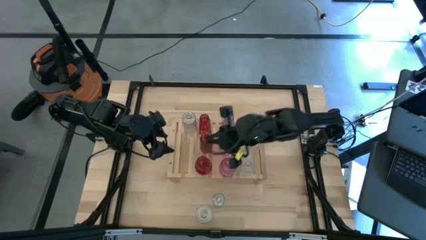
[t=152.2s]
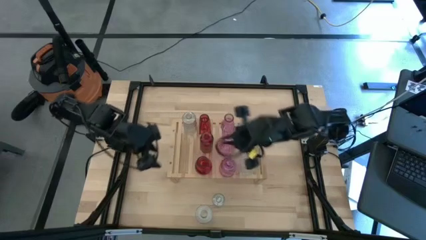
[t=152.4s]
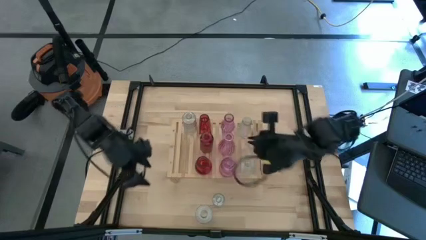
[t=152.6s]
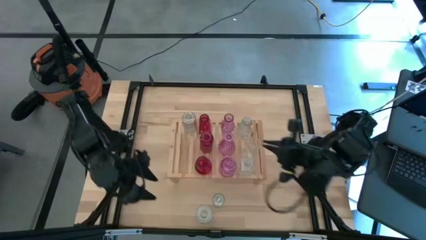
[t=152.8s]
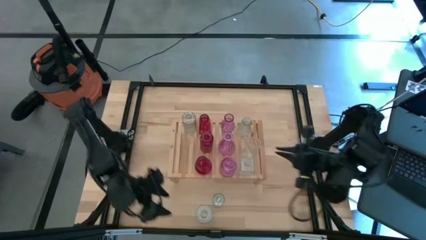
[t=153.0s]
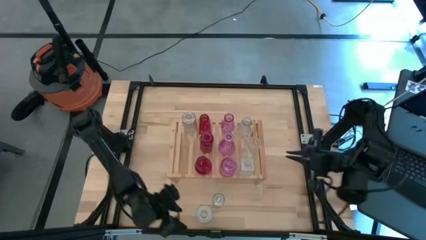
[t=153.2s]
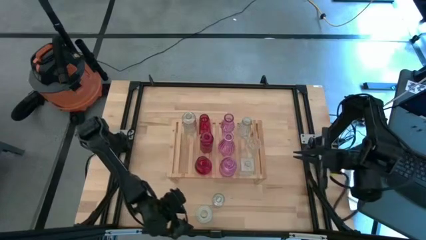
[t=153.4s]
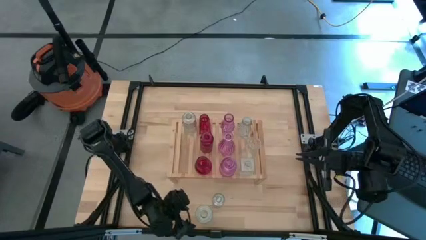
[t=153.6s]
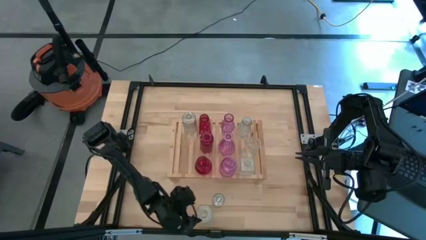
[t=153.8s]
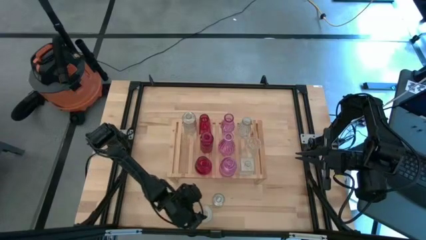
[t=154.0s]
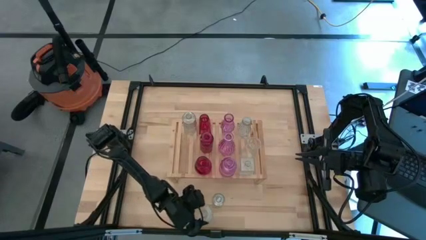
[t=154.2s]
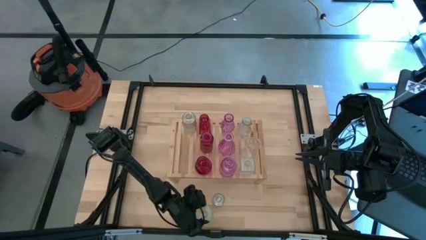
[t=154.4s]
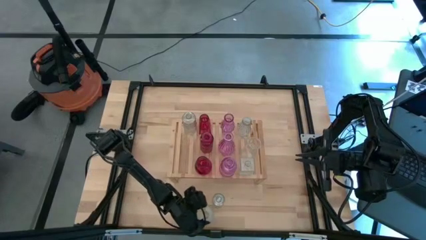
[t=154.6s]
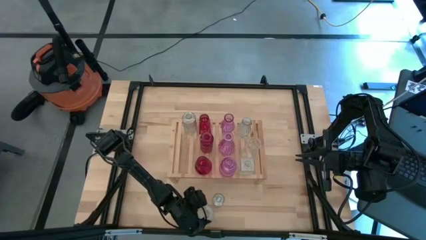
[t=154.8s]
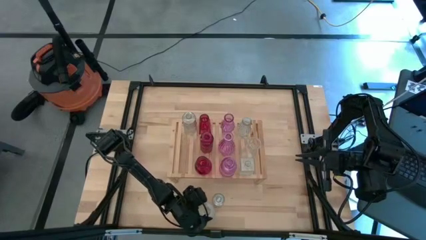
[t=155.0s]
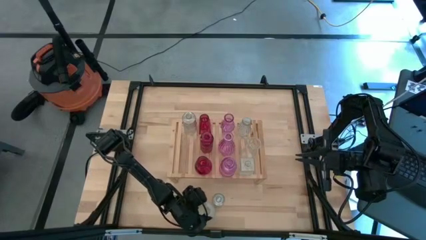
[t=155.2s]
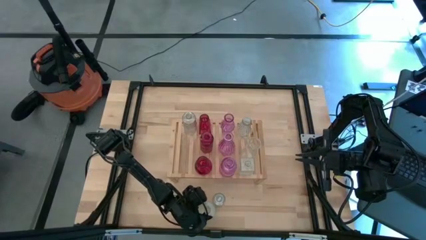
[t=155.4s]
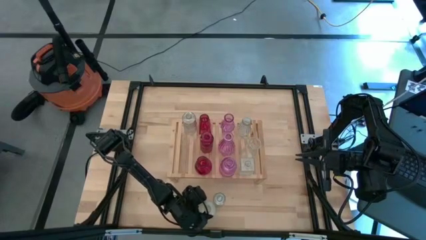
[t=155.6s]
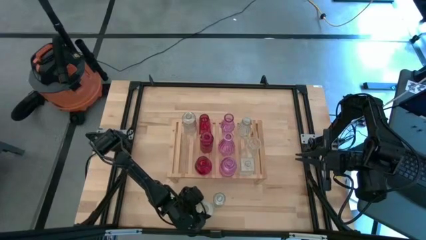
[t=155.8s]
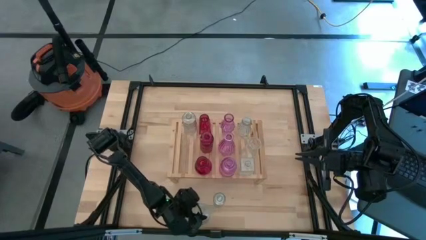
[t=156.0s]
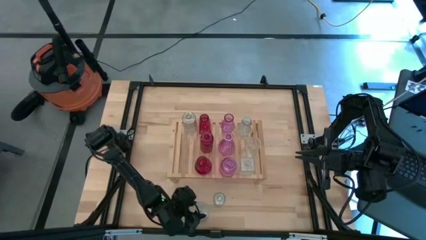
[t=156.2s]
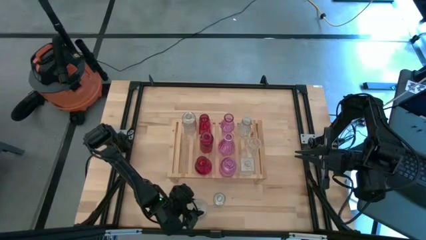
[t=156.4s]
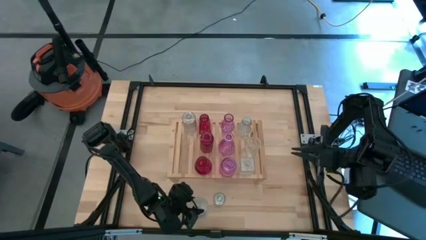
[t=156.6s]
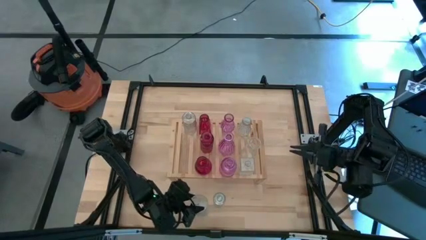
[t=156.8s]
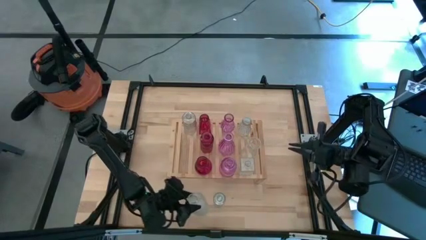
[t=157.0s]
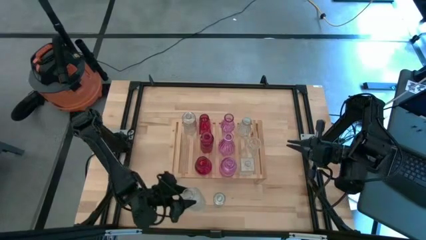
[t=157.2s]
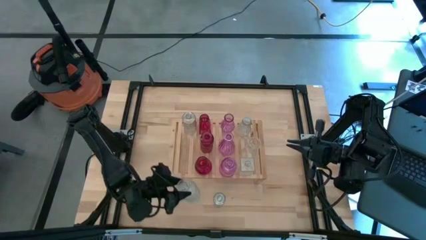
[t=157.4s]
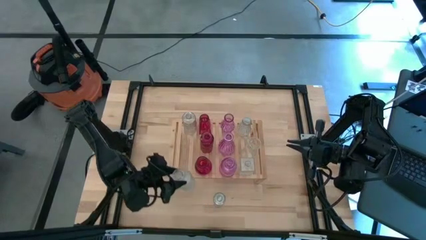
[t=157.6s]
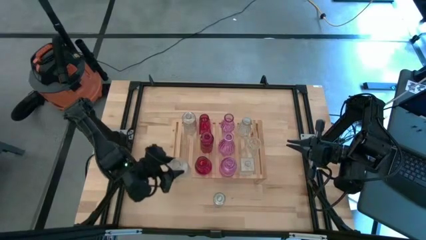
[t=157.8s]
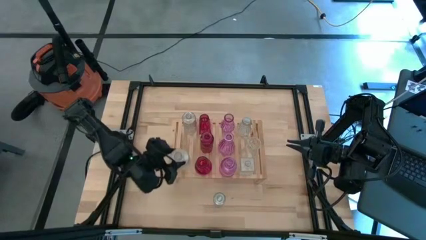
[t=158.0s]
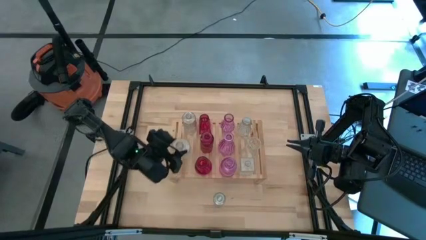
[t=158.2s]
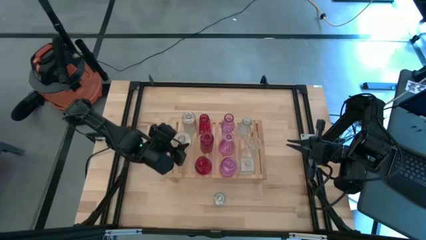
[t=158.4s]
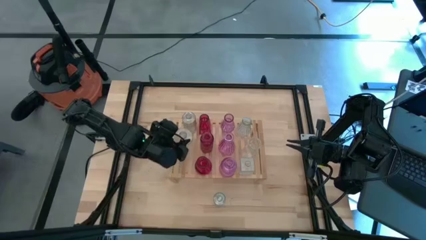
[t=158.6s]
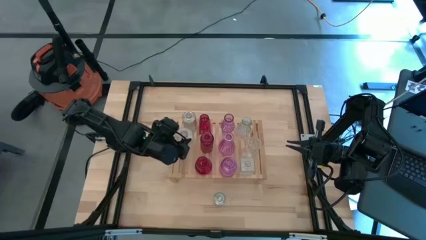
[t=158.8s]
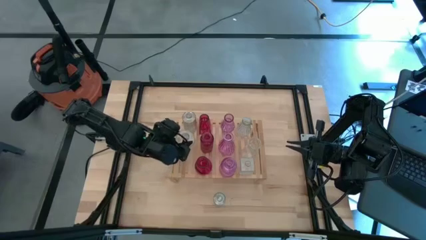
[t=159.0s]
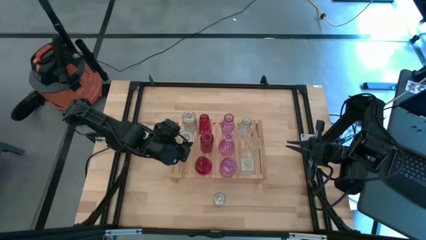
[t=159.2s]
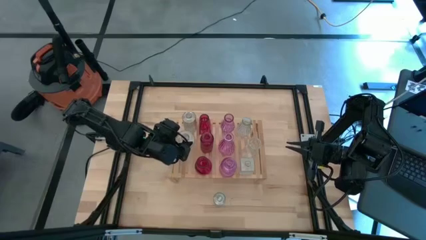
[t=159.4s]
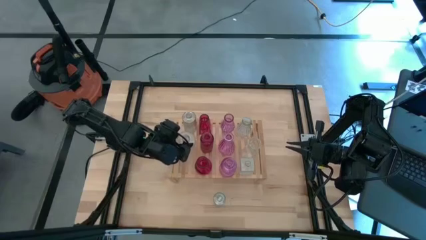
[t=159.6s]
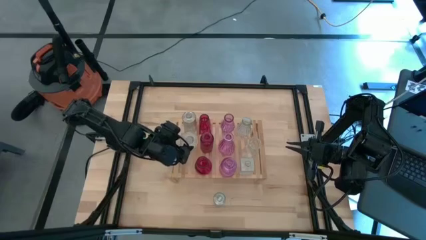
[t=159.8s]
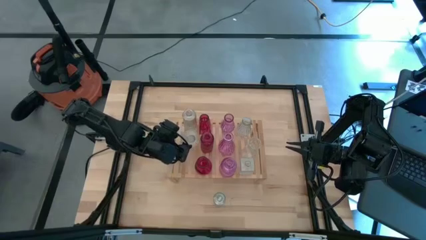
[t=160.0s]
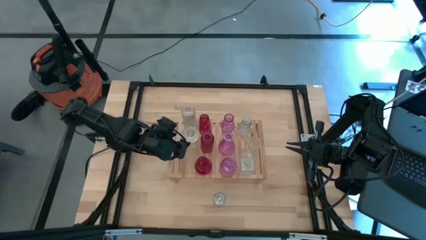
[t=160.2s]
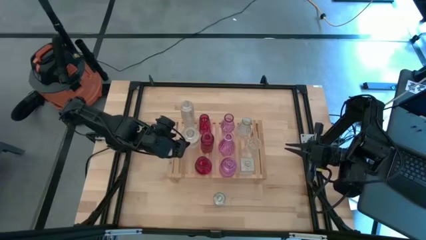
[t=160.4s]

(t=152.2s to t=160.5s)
Task: sort vases onto shelf
Put the transparent vase on the shelf aligned with the other transparent vase

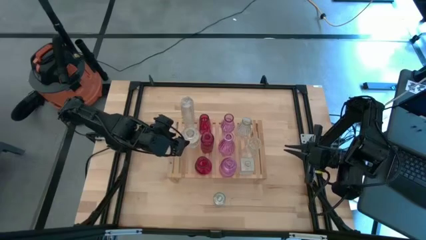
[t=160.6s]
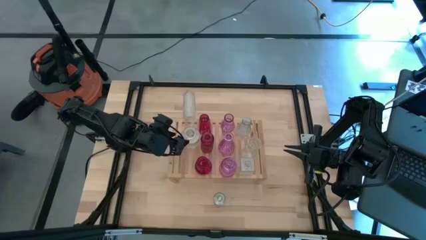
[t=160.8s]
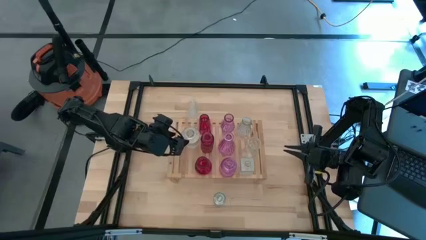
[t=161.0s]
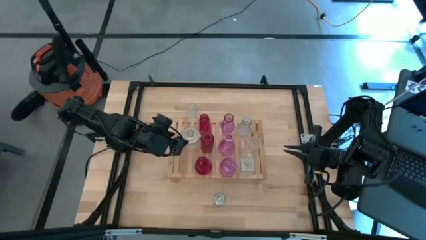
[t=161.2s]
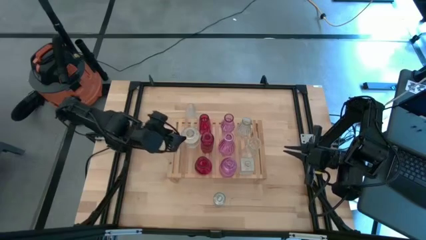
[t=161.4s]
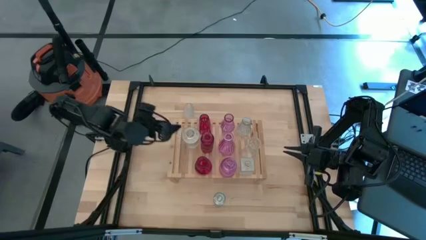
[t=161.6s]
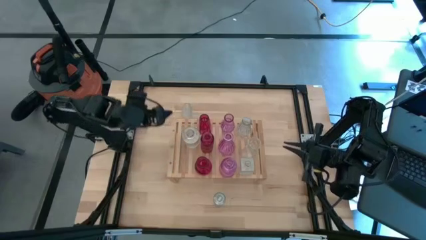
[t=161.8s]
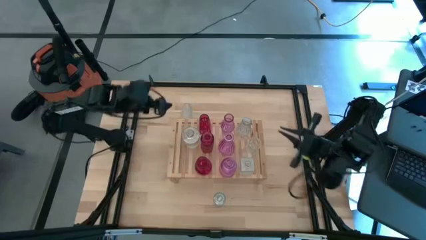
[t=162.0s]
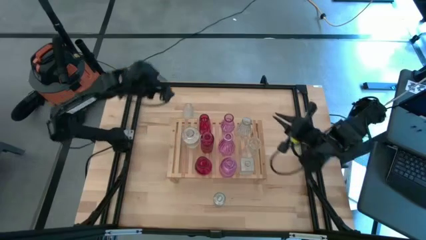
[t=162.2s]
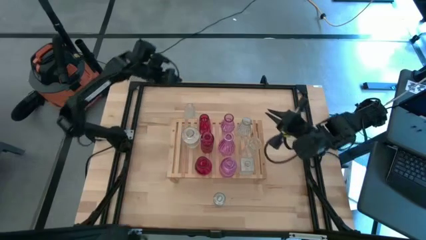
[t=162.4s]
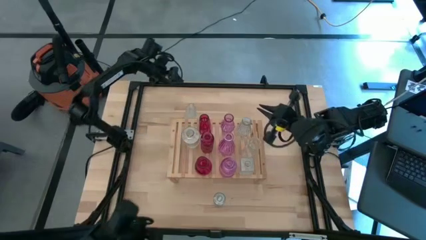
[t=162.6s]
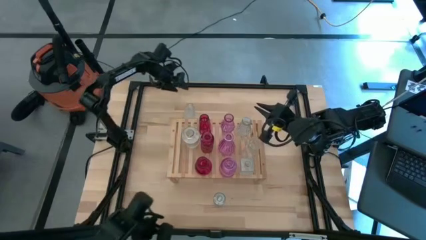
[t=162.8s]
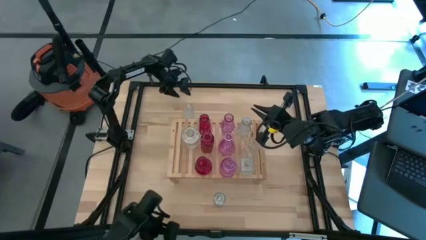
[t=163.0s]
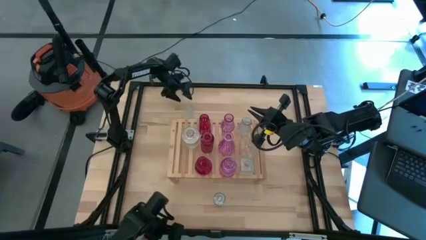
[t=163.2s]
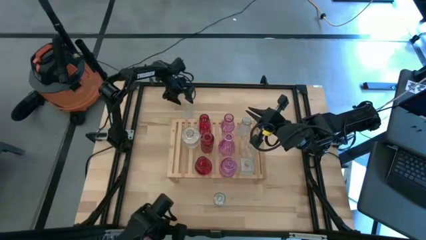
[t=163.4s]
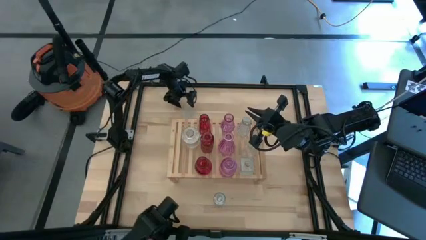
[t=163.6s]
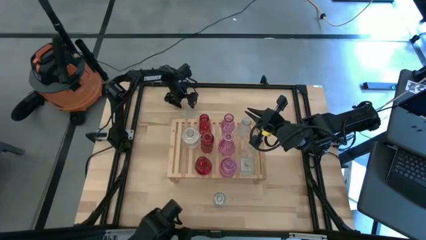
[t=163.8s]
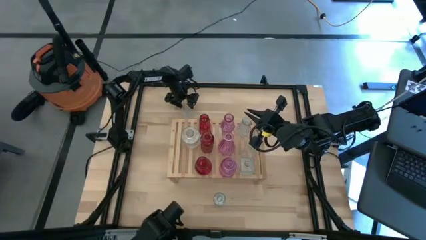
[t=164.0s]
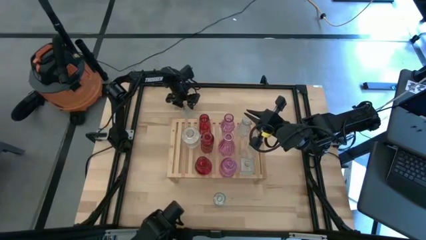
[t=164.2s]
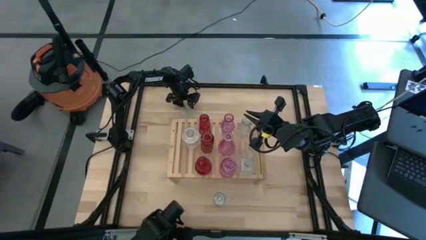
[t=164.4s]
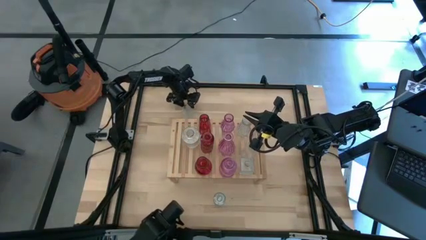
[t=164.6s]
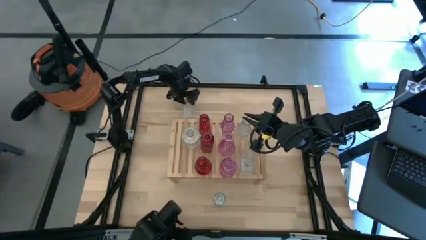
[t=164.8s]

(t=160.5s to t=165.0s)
Put the transparent vase on the shelf aligned with the other transparent vase

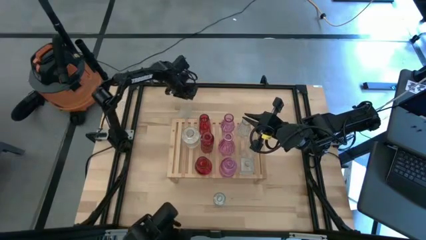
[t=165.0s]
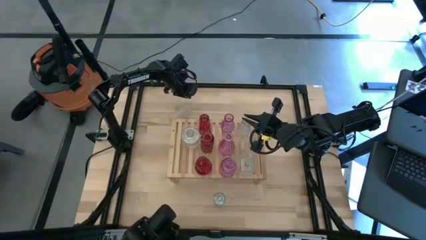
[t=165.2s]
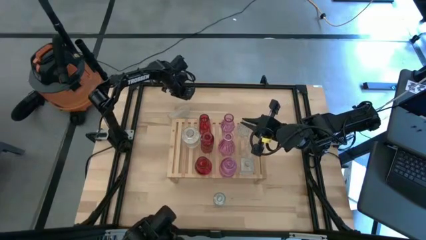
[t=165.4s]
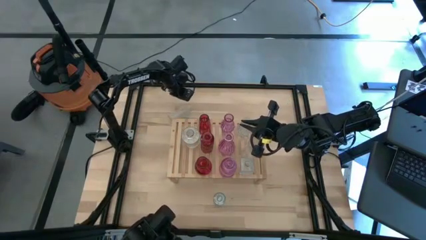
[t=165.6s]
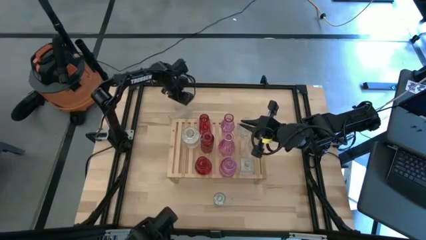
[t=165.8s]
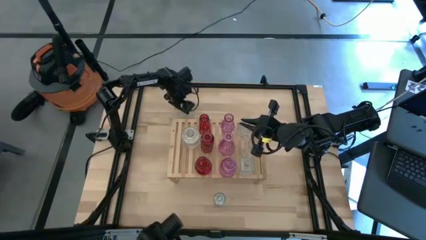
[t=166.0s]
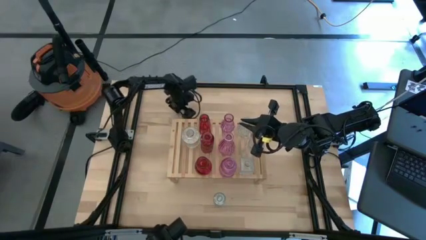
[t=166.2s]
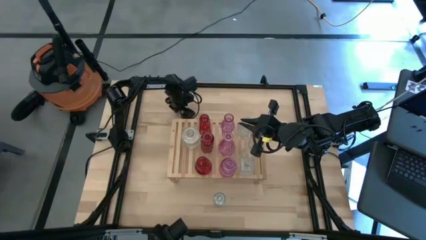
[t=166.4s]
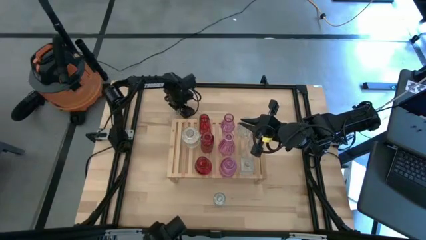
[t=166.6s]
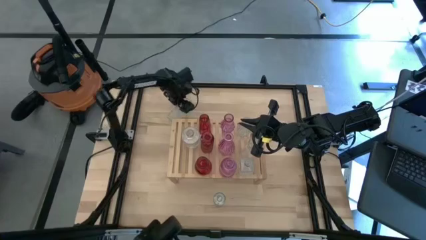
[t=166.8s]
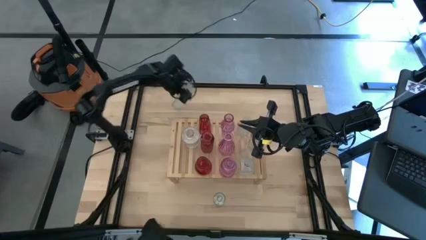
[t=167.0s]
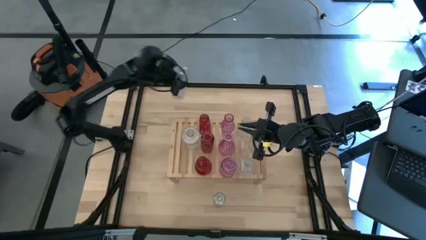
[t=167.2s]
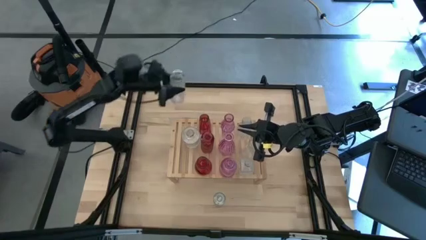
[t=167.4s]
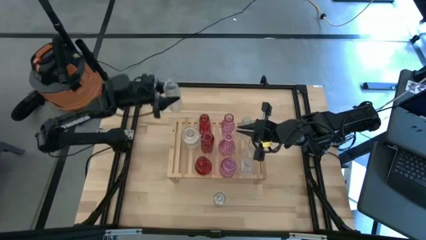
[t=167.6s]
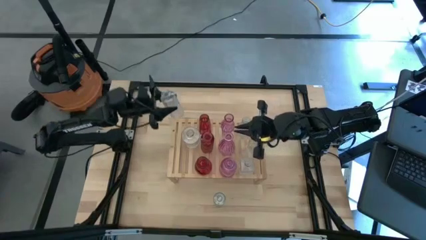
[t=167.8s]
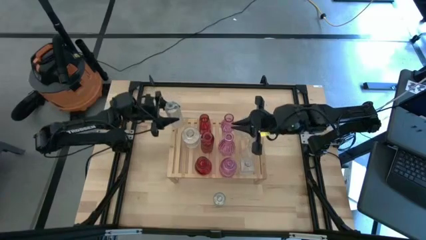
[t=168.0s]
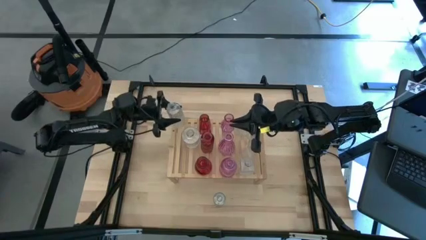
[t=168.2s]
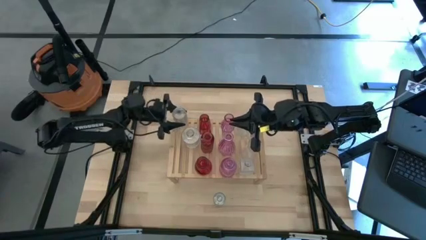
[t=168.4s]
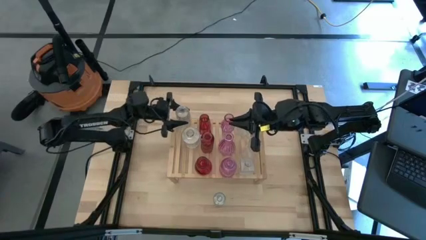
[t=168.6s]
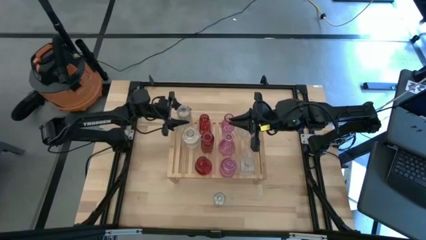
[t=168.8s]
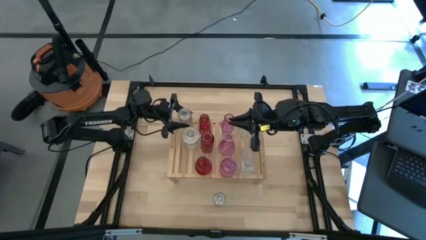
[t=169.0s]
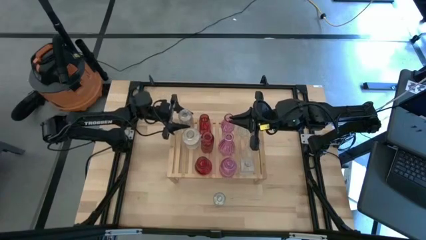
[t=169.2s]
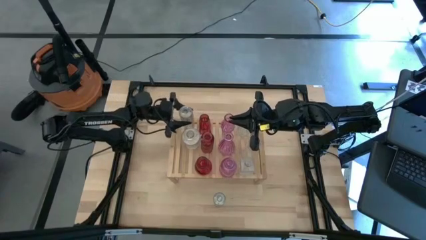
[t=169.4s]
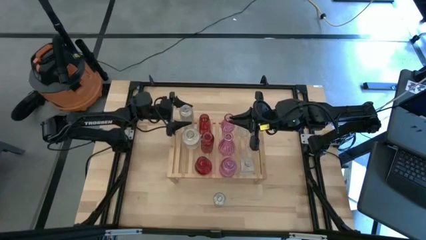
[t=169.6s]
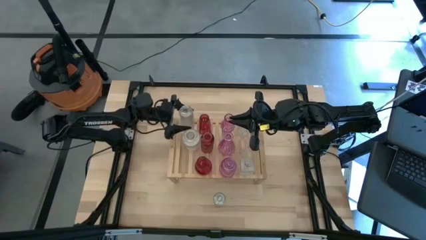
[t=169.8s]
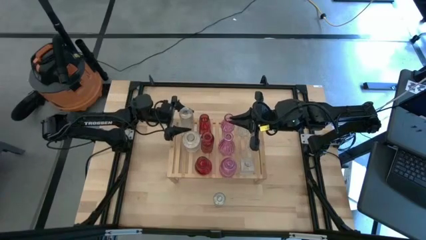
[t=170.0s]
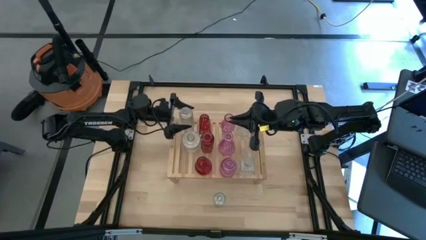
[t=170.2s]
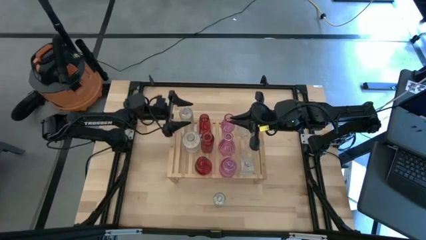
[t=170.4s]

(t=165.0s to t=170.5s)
Put the transparent vase on the shelf aligned with the other transparent vase
